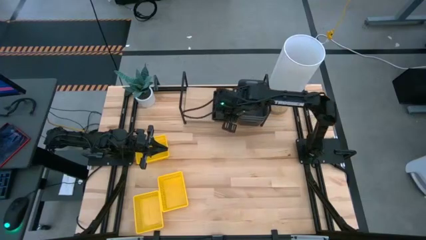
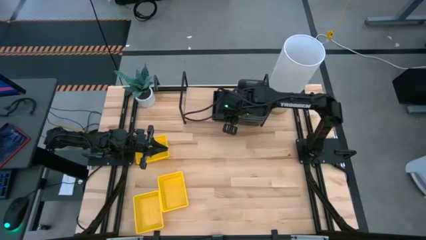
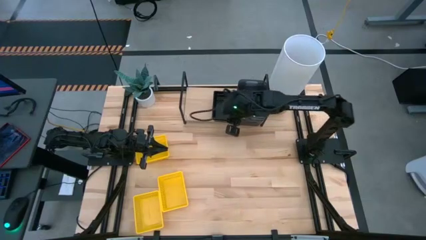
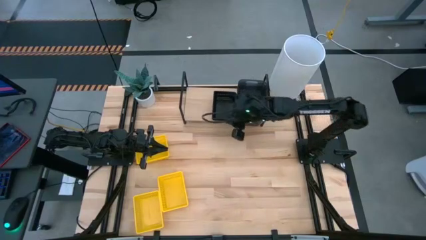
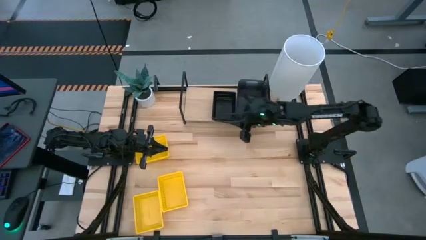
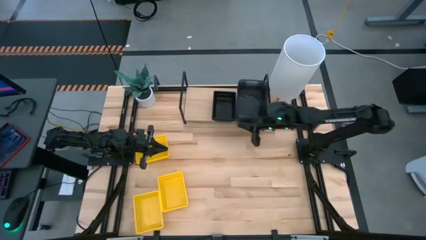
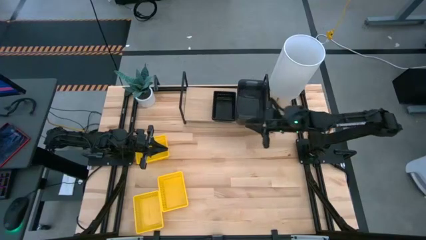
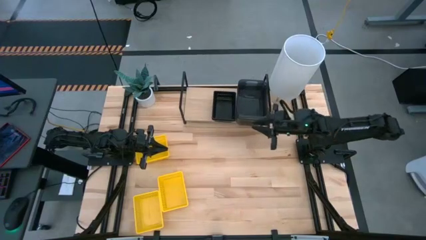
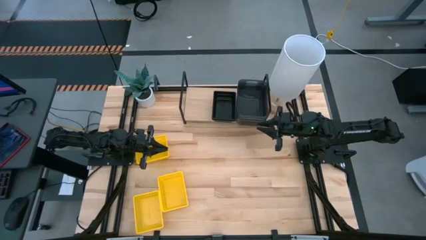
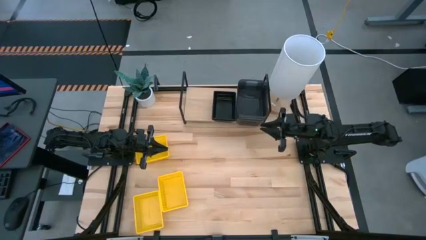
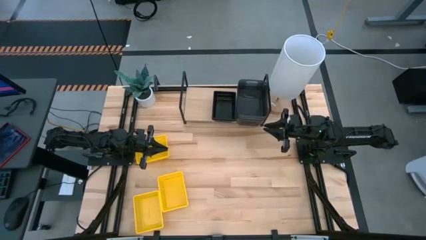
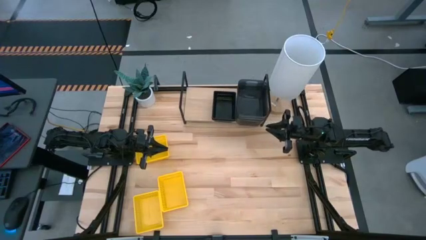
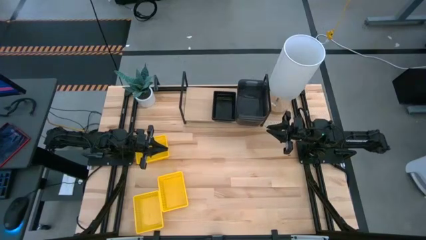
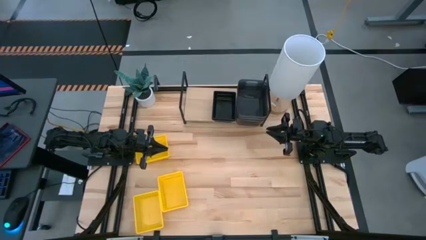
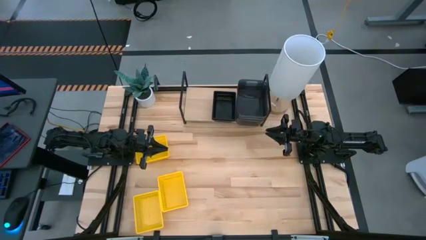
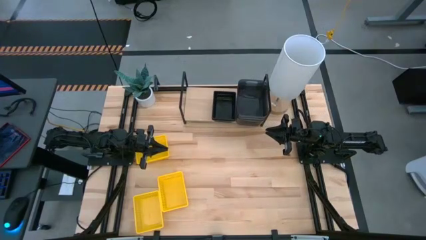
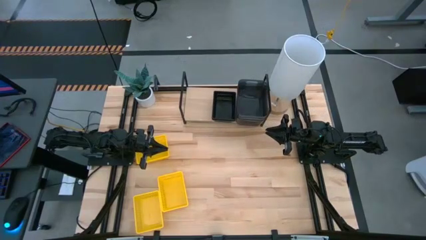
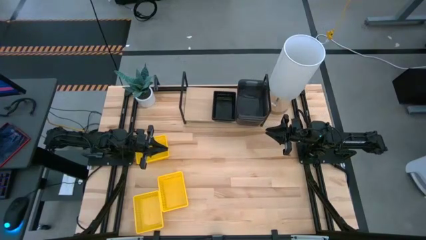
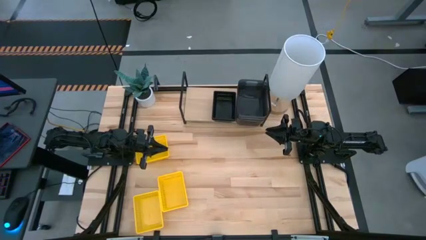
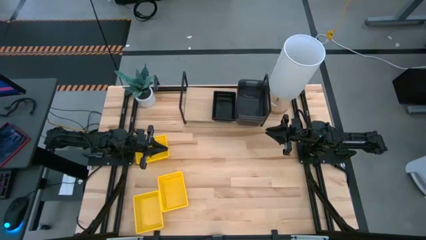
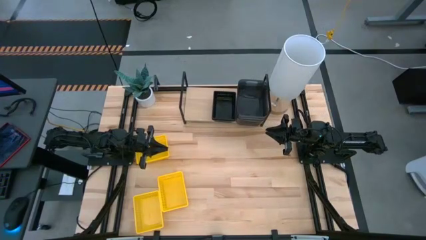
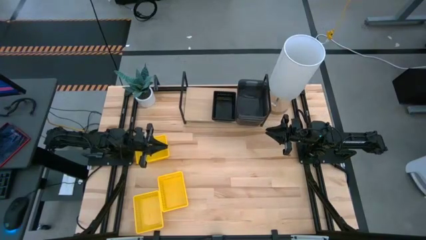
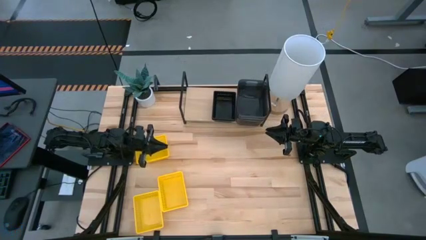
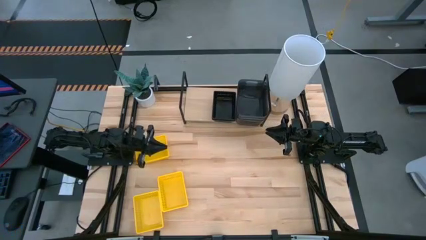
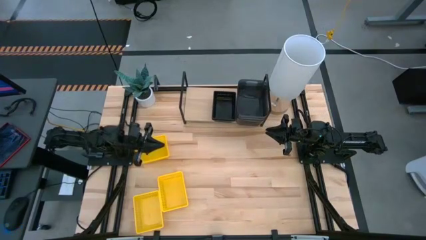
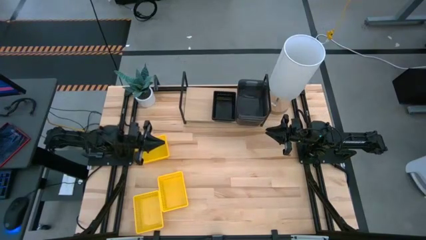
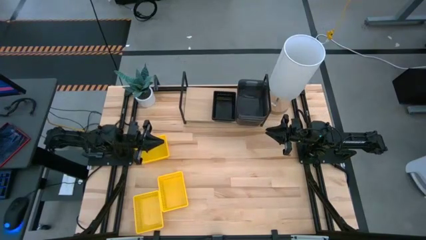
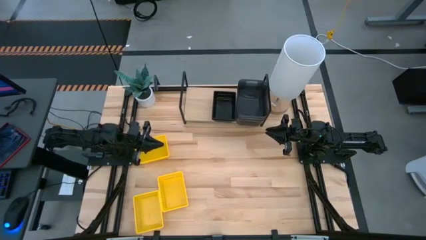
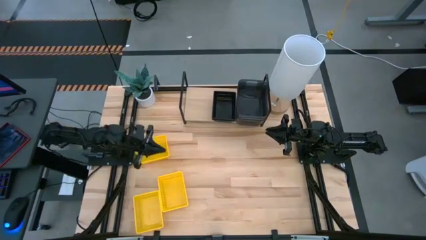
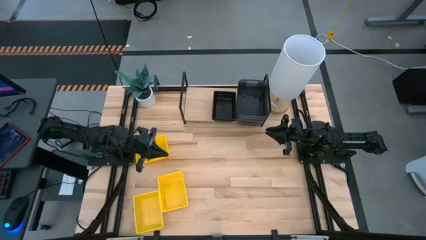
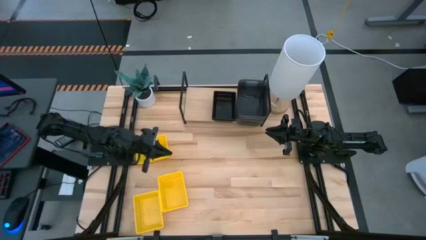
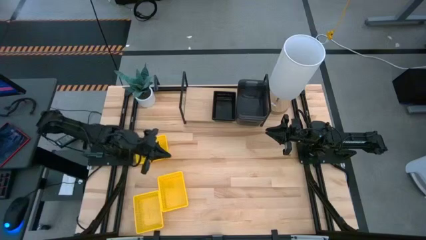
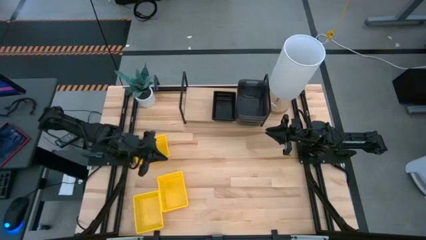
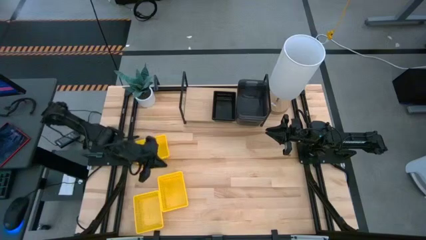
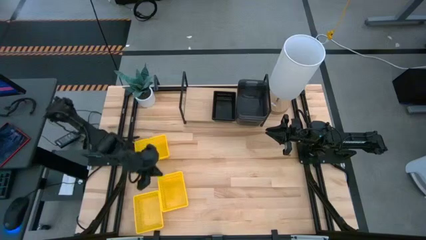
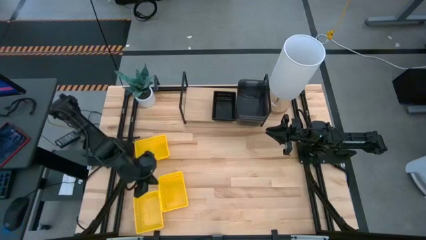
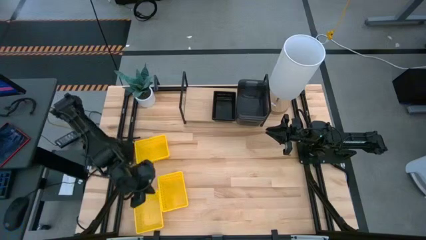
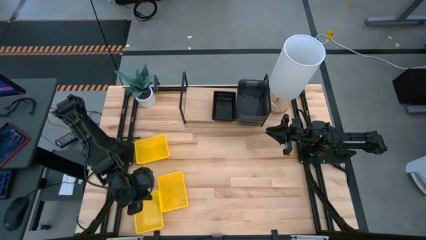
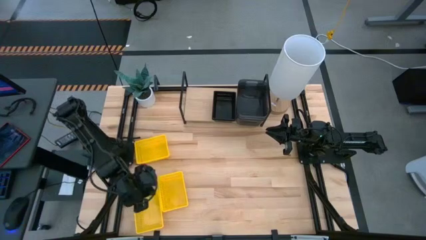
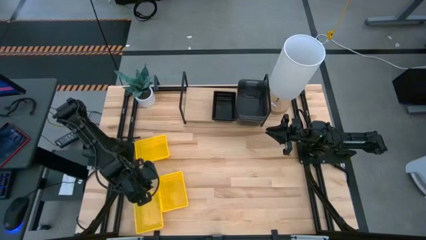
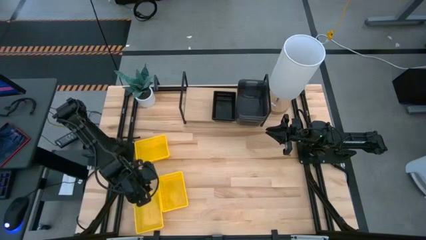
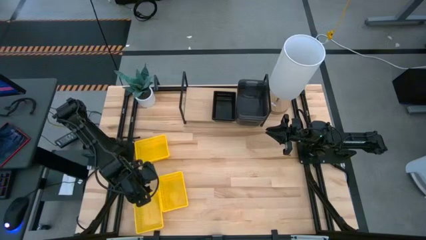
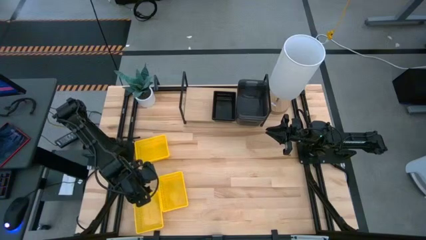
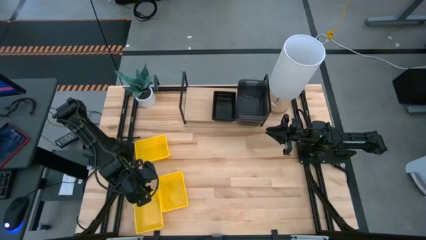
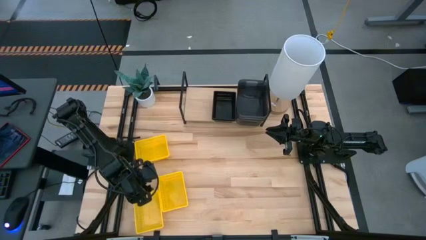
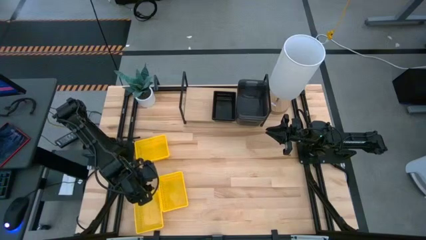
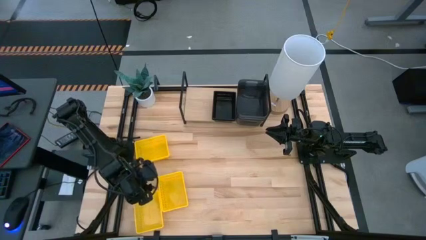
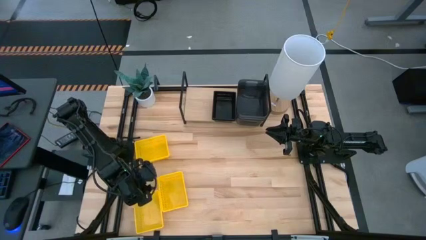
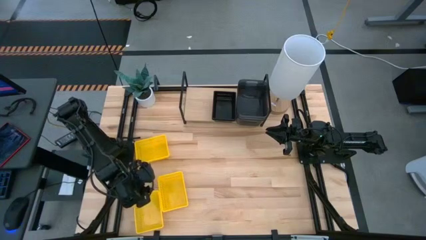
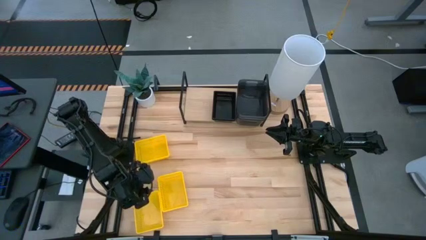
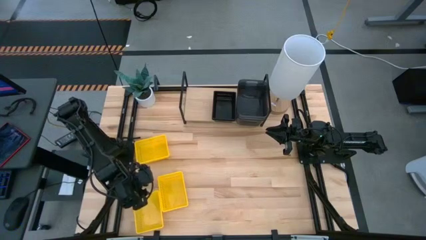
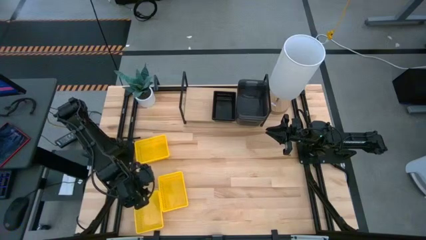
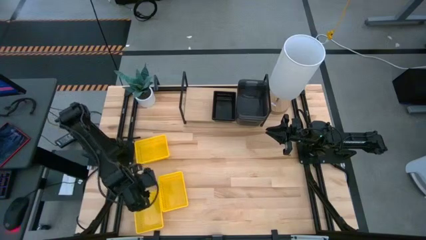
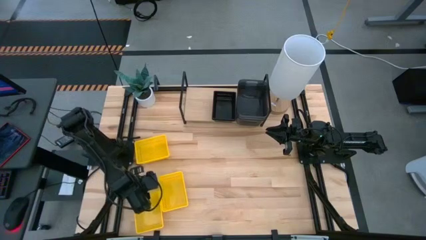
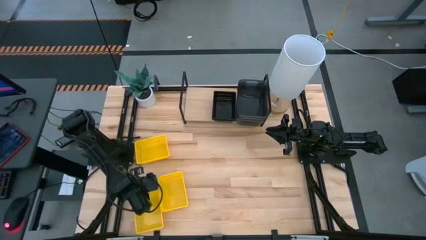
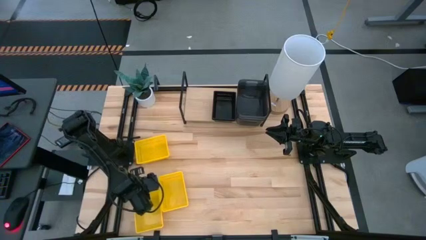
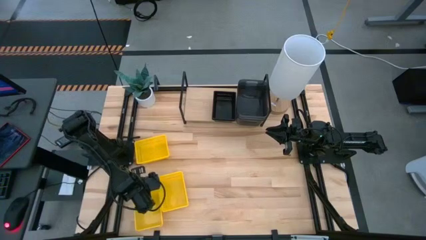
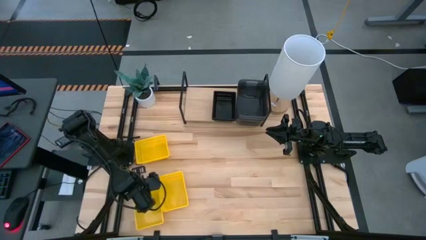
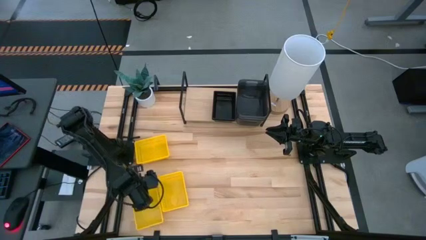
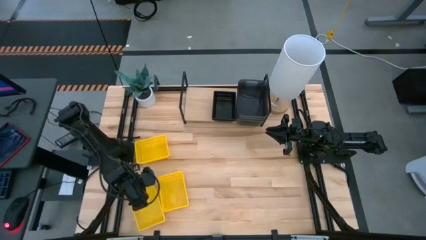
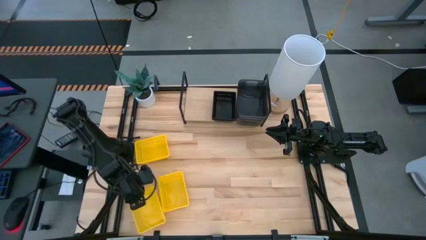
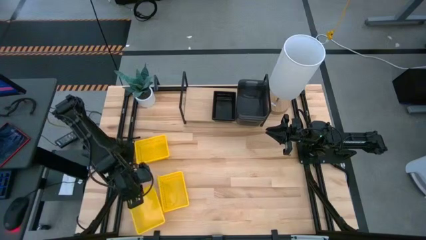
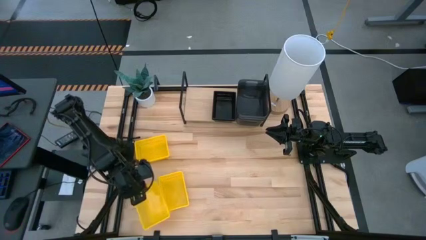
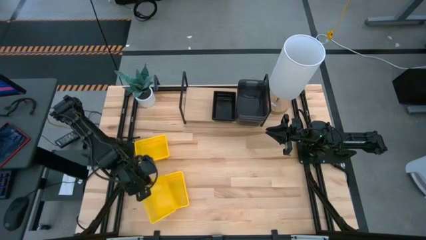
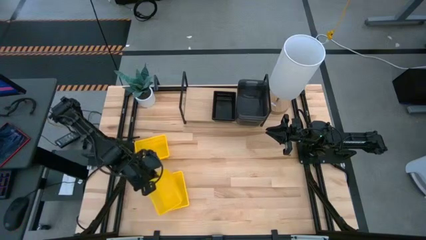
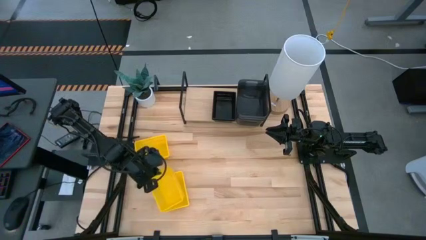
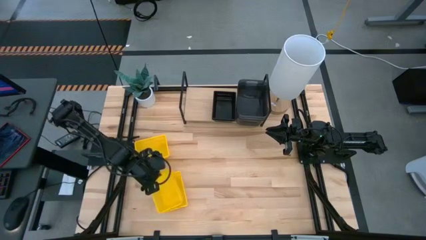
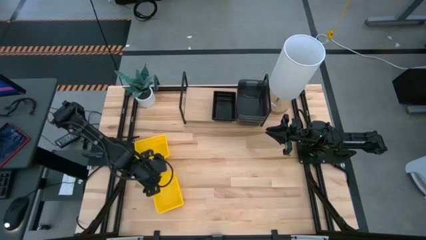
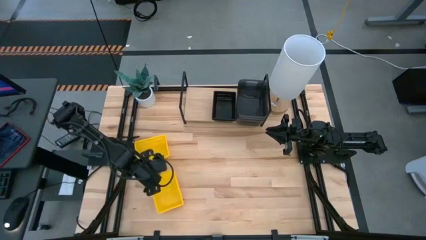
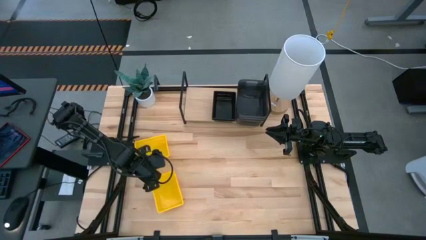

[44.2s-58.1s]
Task: Stack baskets on shelf by color
Stack the bottom left yellow bin on the bottom right yellow bin

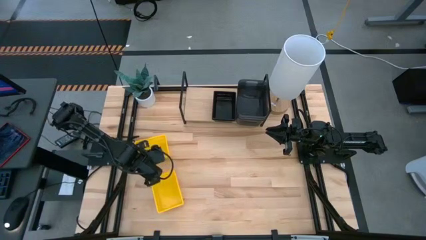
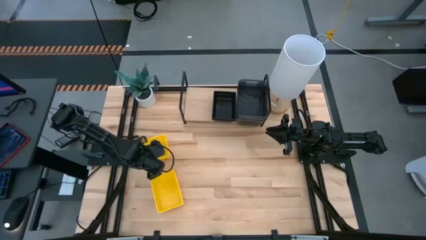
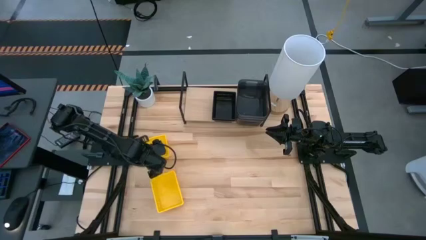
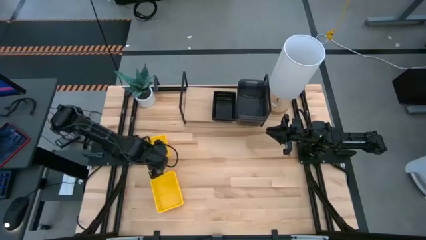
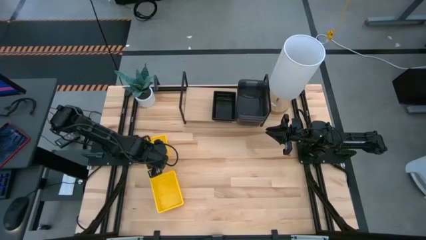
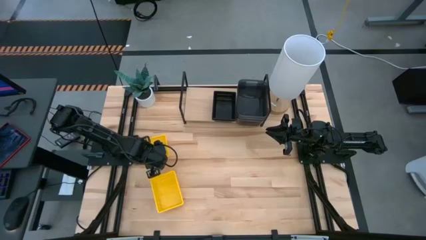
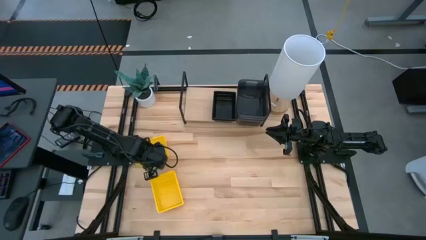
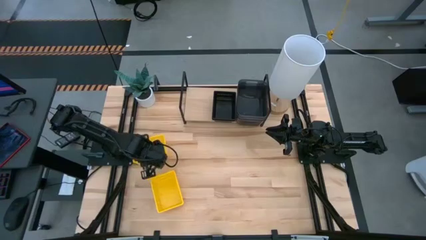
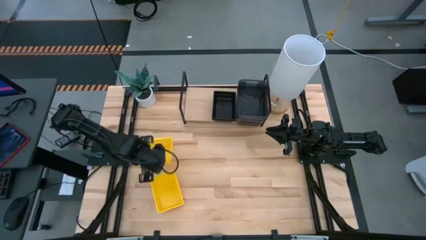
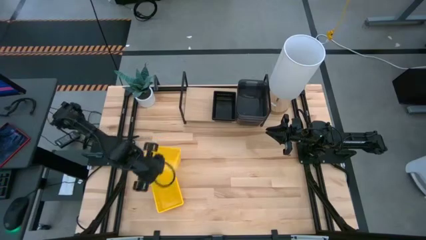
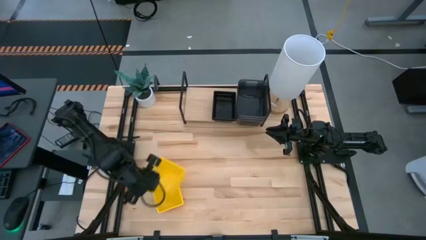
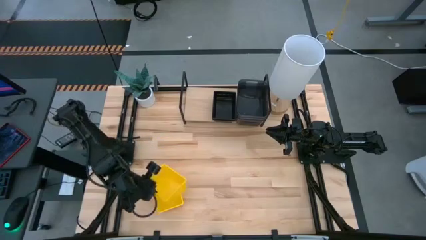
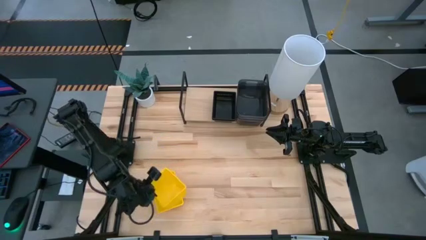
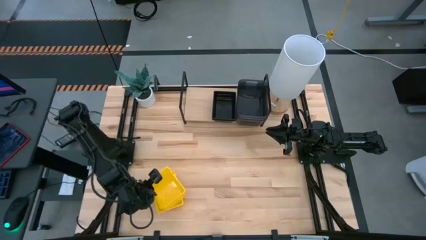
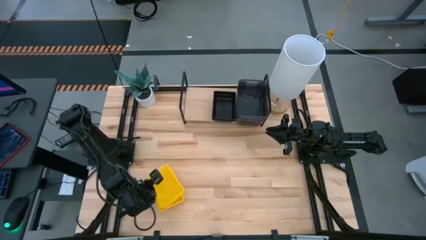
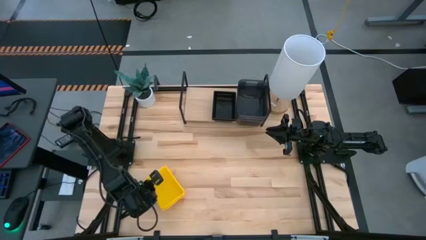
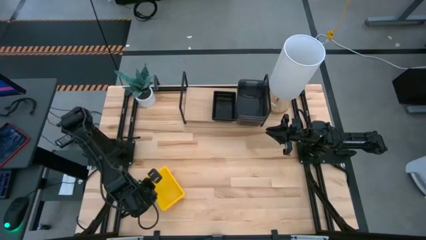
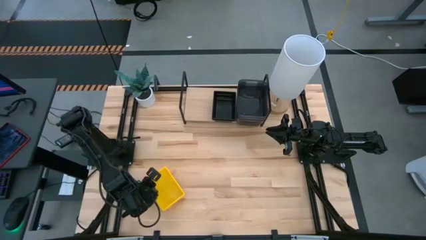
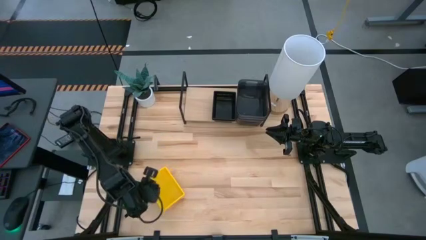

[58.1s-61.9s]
Stack the yellow bin on the stacked yellow bins
